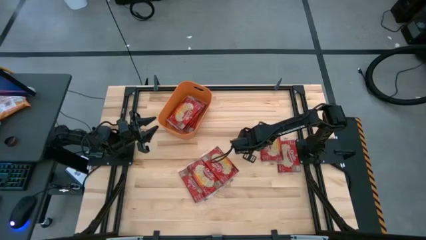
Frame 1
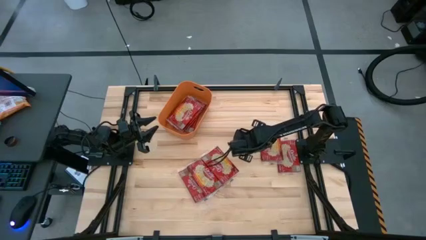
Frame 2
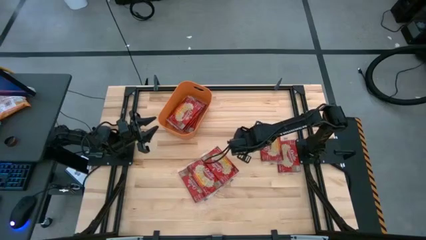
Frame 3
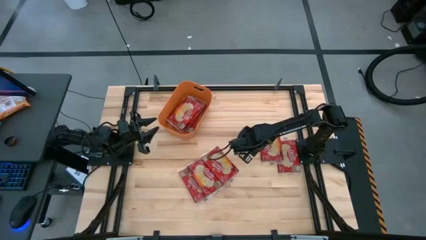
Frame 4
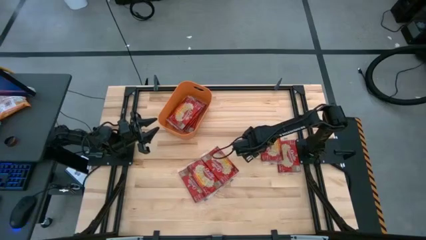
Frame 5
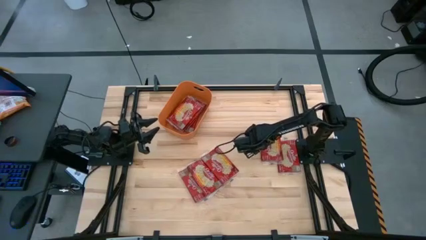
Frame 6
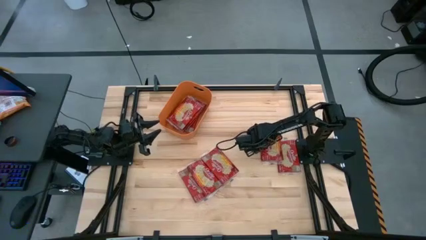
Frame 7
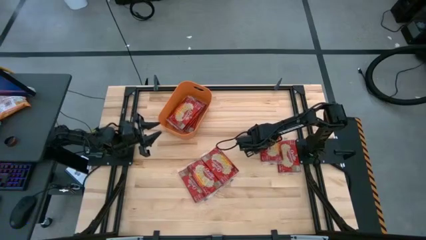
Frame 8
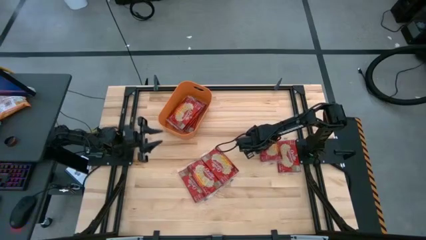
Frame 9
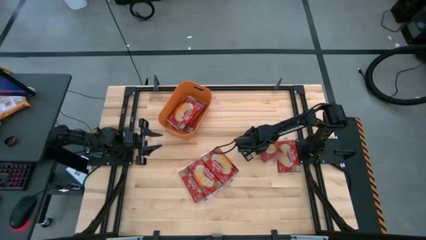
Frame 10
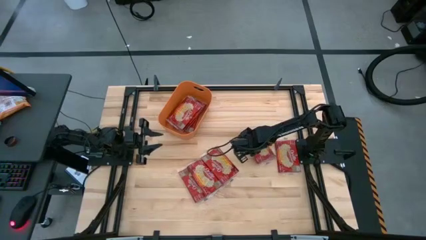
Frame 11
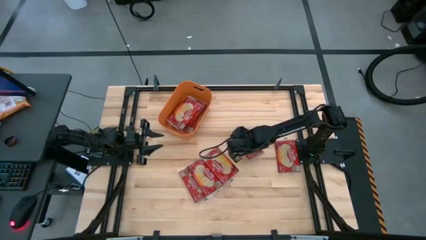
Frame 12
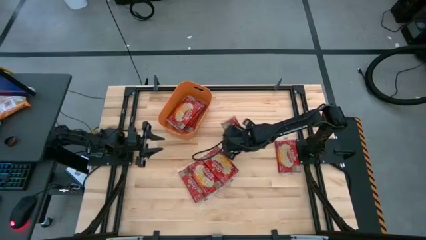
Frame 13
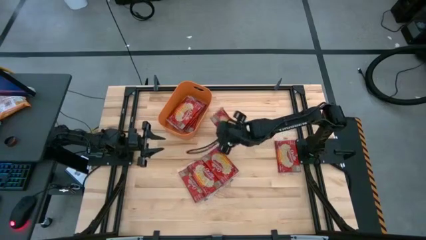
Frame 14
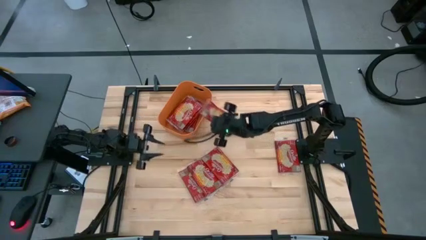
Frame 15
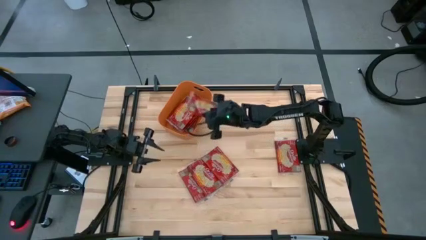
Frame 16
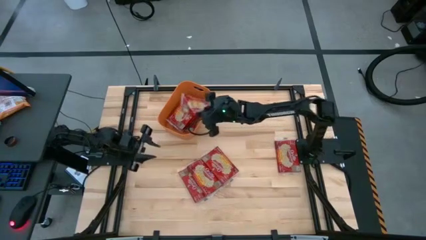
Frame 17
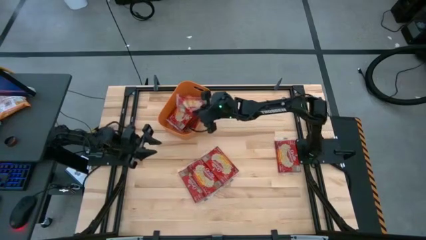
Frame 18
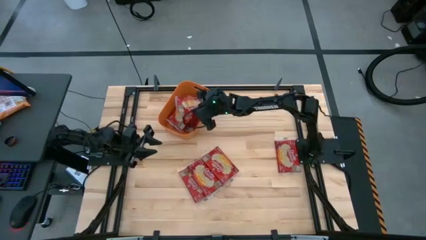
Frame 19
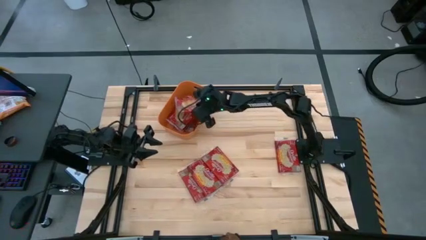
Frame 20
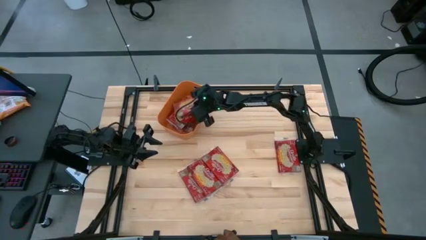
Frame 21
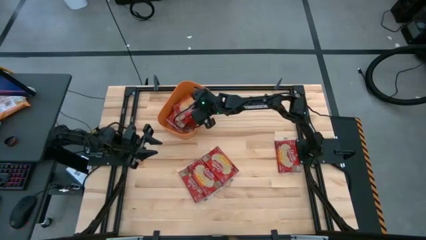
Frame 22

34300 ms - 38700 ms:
Task: Sort popcorn bags into baskets
Put the red popcorn bag into the orange bin

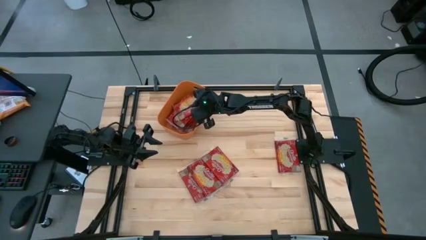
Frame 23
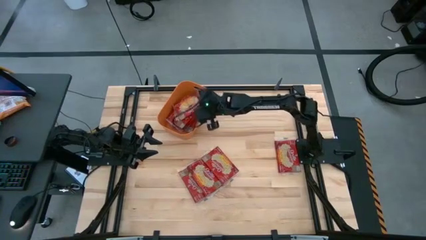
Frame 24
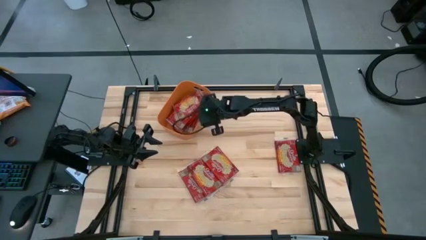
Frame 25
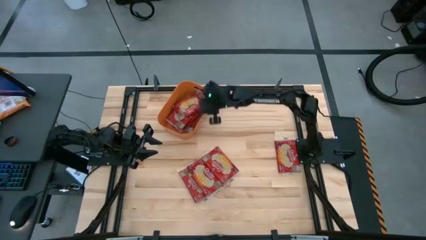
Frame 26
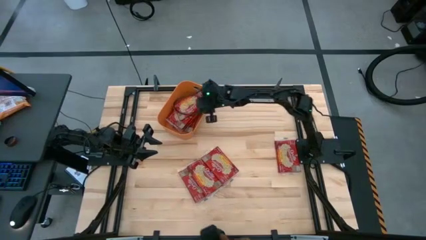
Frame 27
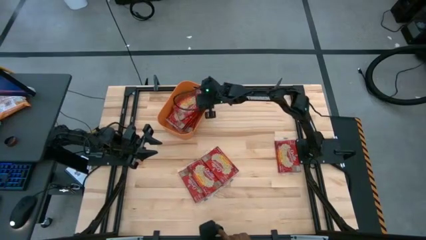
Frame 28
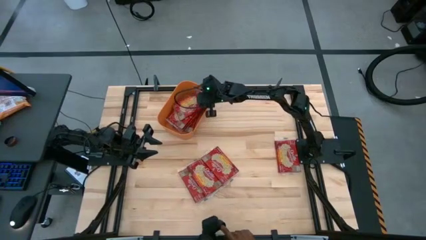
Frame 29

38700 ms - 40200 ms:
Adjust the orange bin on the table

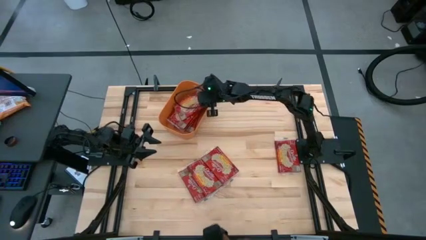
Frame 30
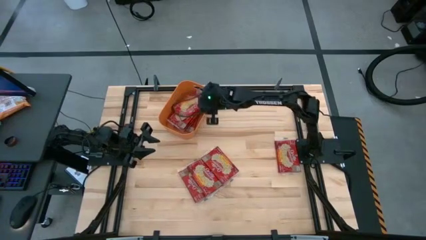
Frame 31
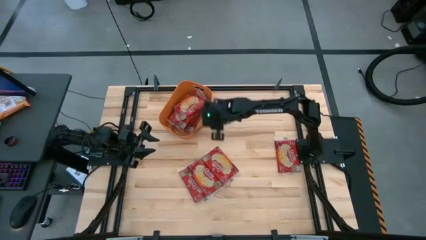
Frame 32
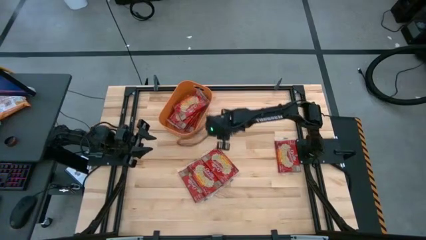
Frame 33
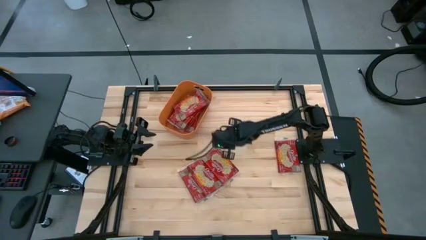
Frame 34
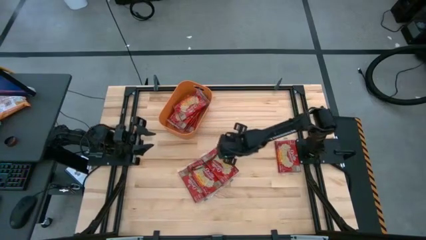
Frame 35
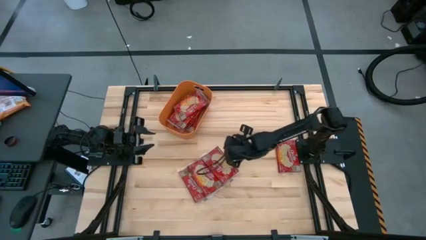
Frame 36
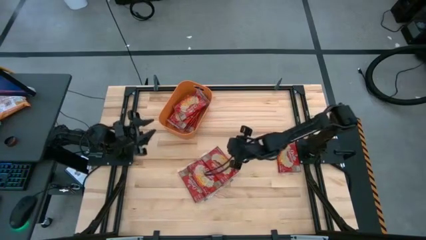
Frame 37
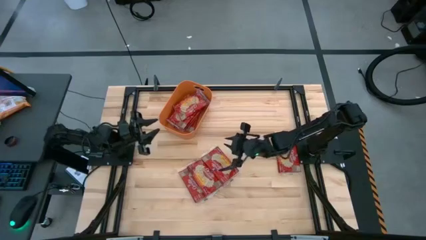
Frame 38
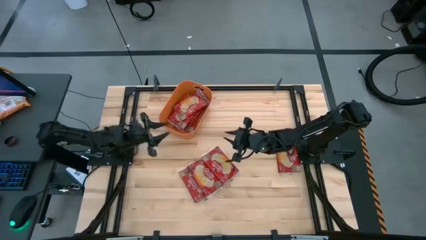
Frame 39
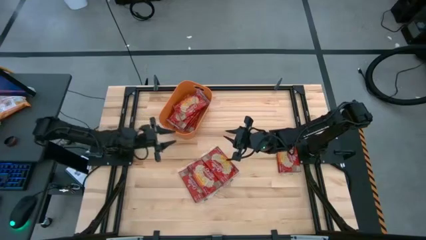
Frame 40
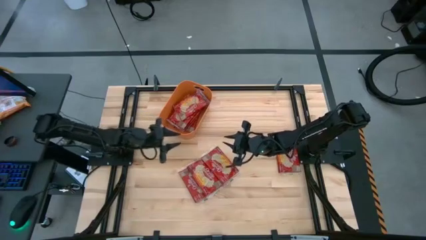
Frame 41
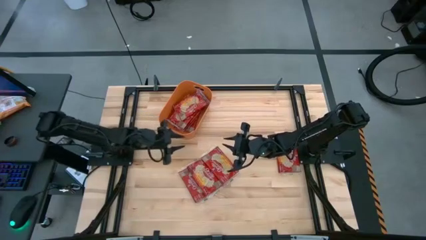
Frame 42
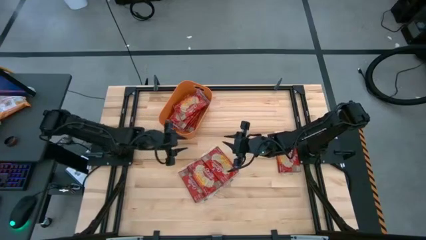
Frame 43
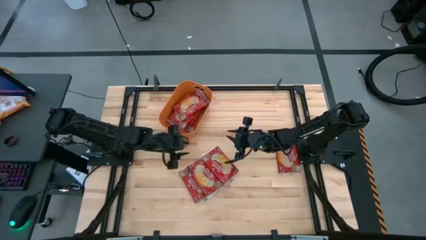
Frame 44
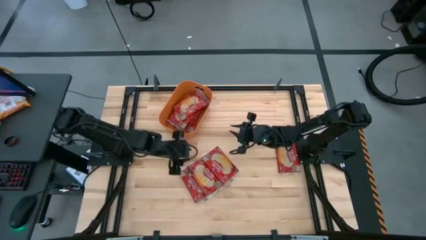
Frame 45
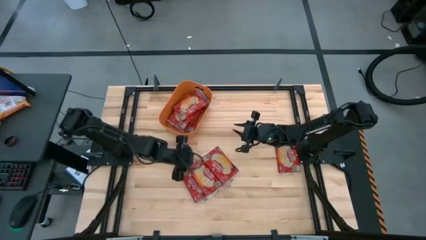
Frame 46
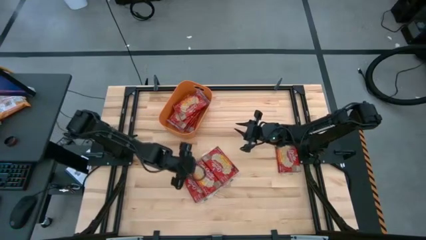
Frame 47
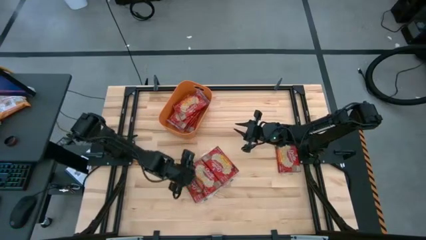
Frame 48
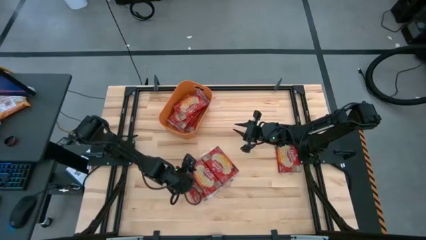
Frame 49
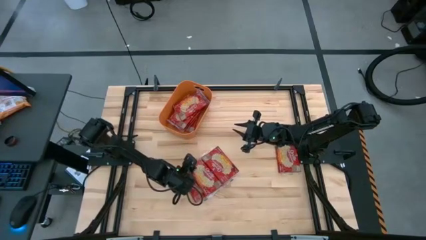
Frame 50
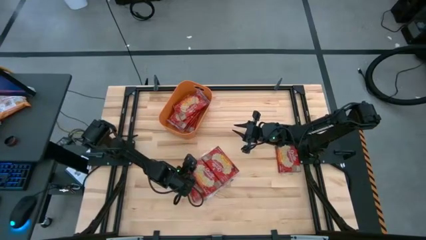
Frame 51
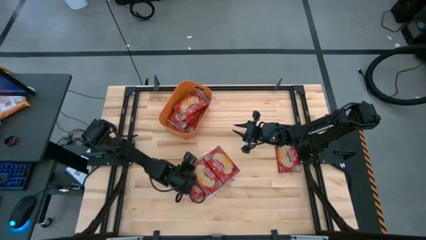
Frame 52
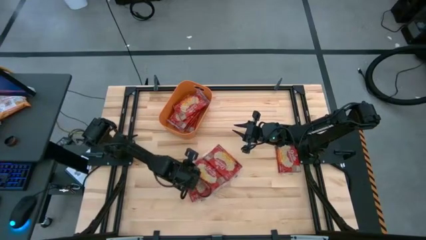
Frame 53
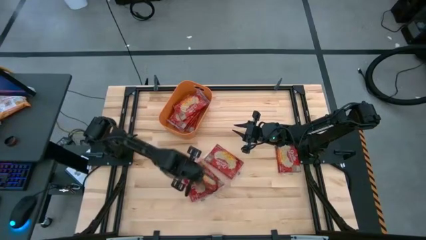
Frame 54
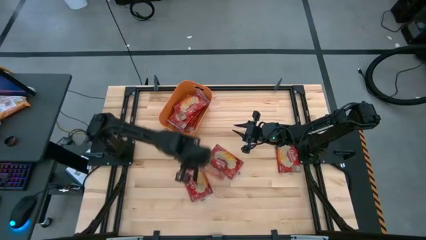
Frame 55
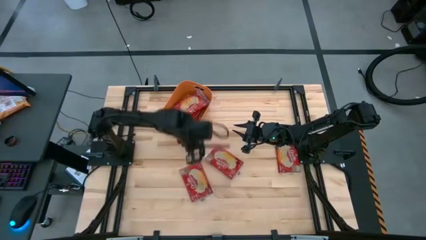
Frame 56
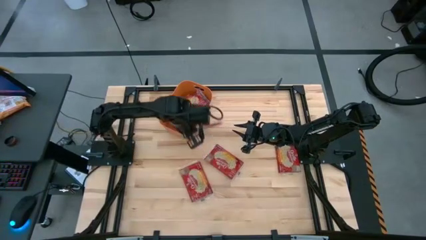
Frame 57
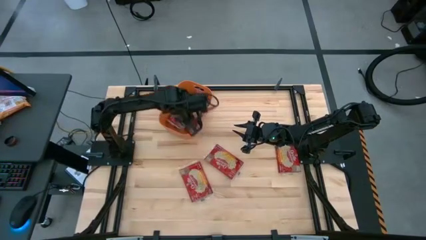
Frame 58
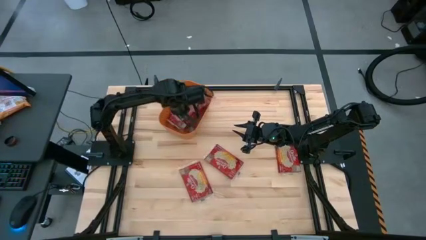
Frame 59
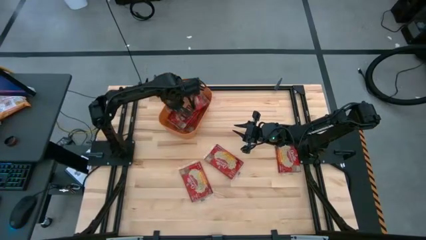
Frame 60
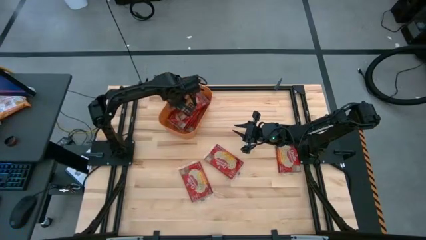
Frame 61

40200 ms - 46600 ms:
Put the red popcorn bag into the orange bin

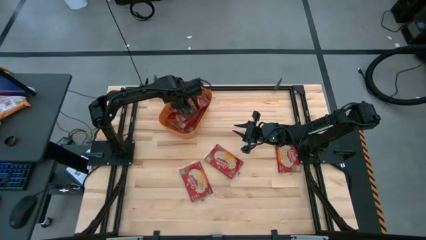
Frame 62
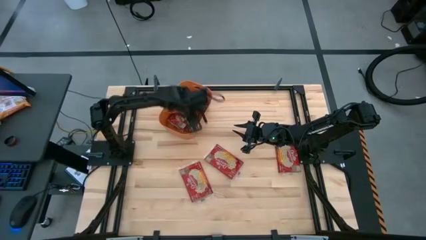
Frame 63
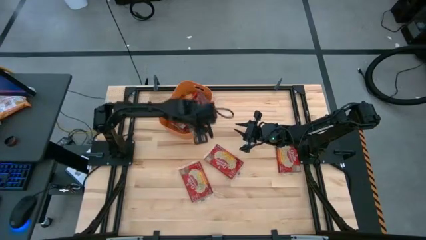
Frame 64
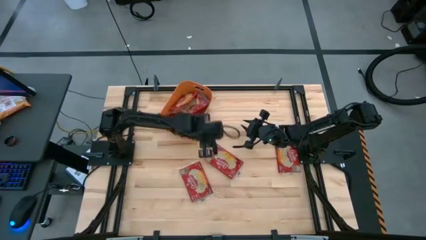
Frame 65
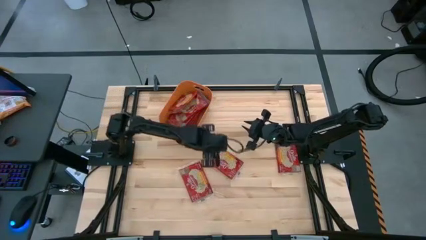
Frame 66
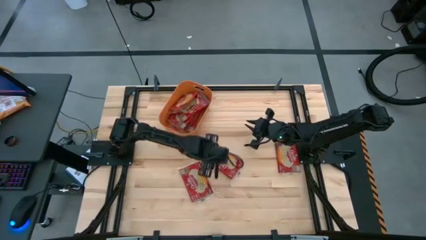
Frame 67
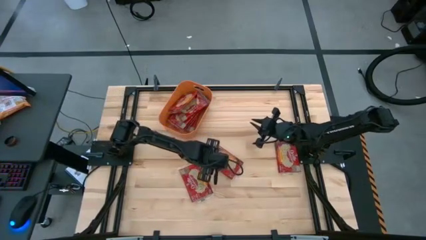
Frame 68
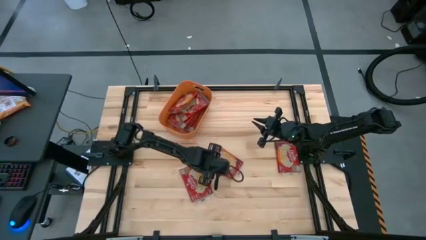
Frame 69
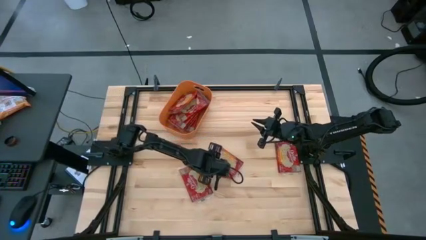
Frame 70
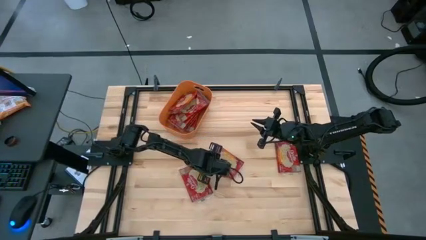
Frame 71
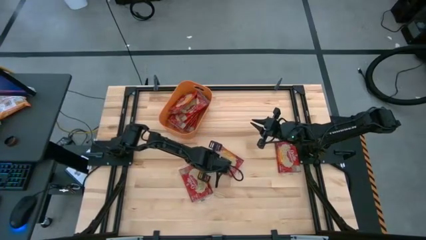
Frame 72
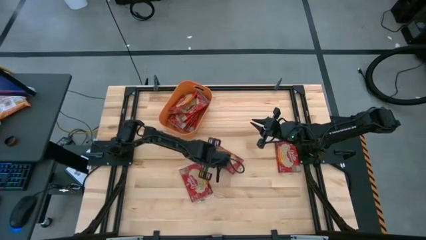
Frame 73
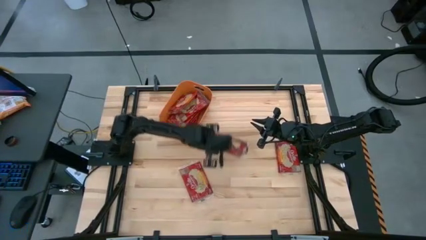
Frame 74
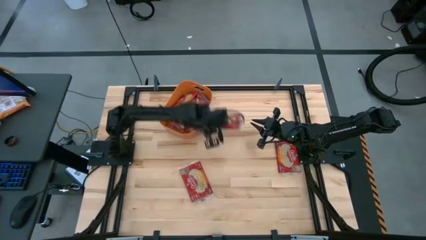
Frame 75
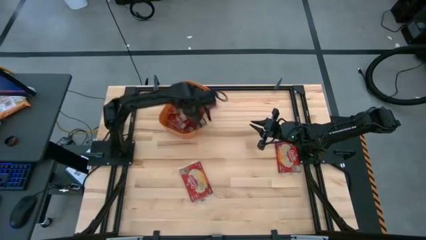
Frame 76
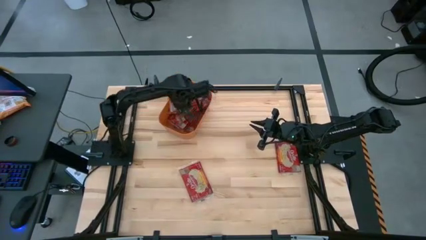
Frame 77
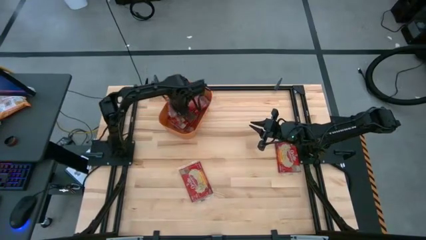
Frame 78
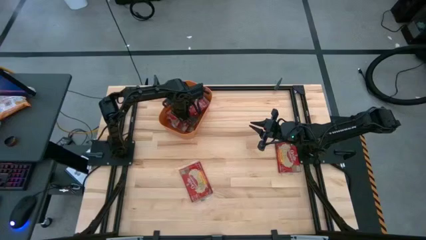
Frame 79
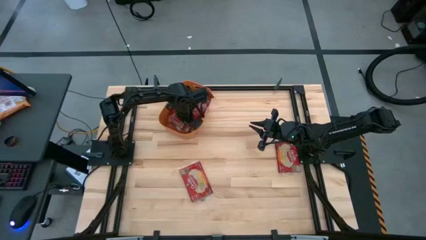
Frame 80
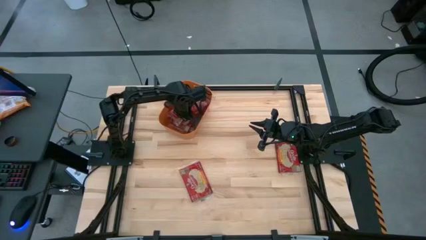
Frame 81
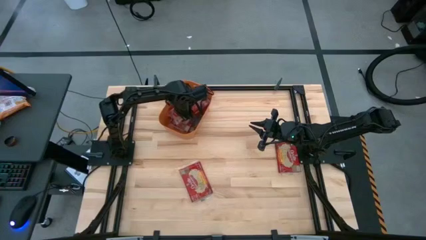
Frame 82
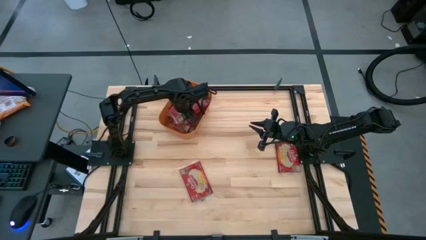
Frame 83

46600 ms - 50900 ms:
Put the red popcorn bag into the orange bin
